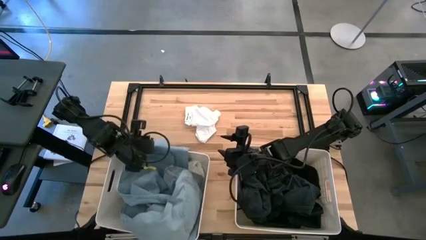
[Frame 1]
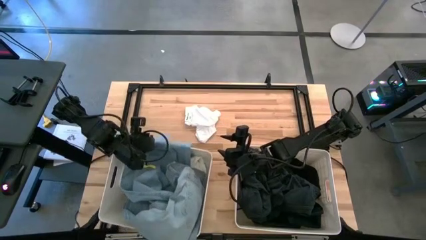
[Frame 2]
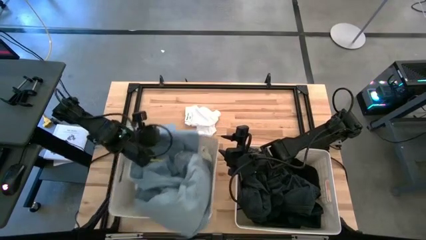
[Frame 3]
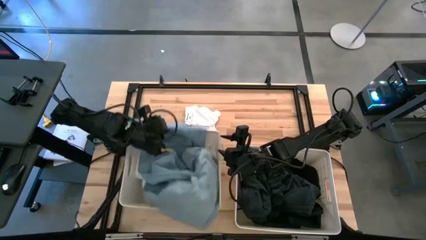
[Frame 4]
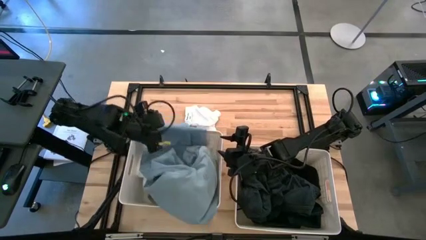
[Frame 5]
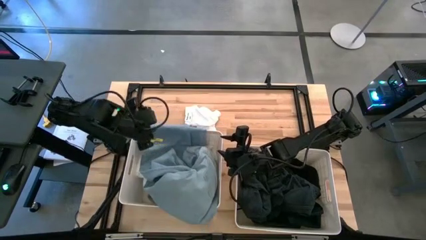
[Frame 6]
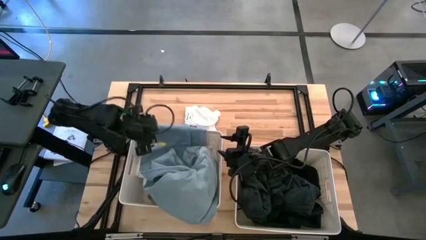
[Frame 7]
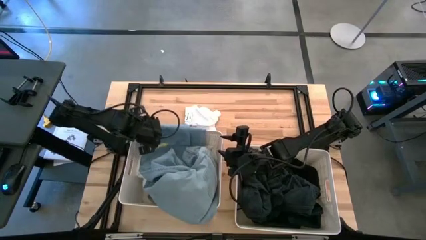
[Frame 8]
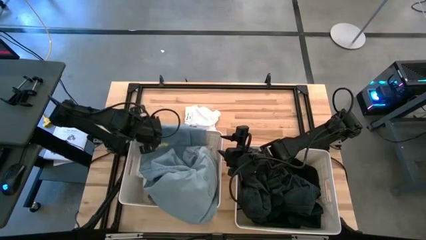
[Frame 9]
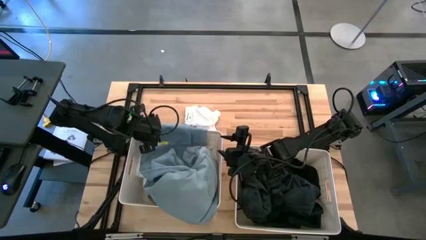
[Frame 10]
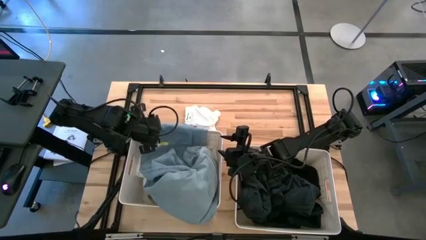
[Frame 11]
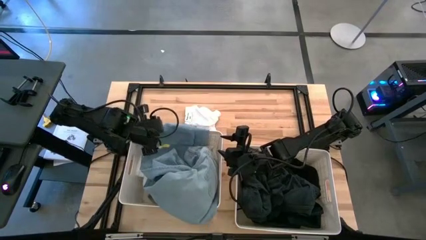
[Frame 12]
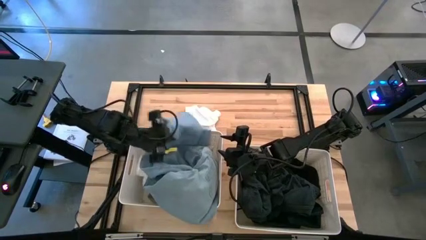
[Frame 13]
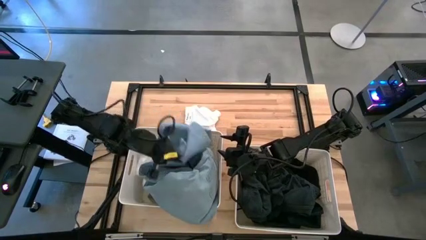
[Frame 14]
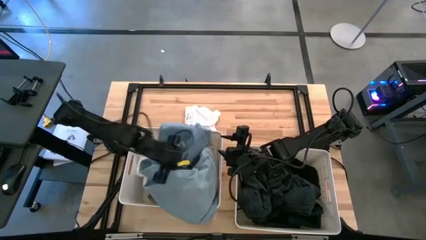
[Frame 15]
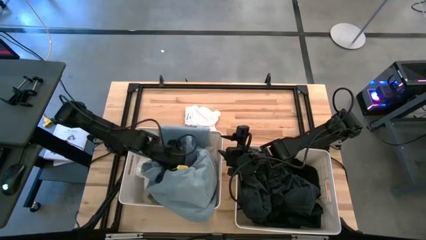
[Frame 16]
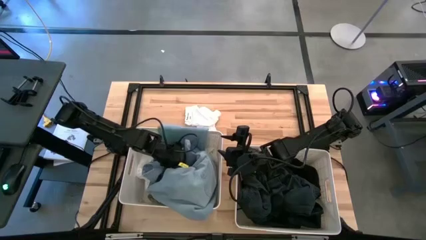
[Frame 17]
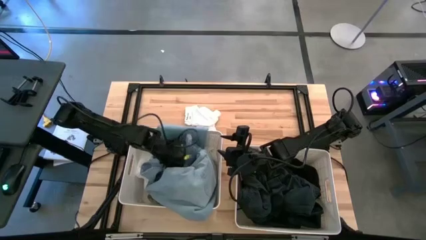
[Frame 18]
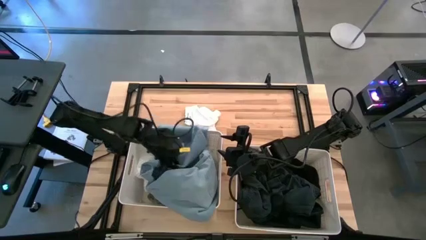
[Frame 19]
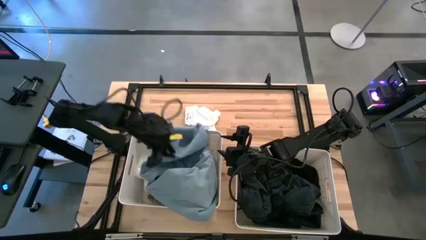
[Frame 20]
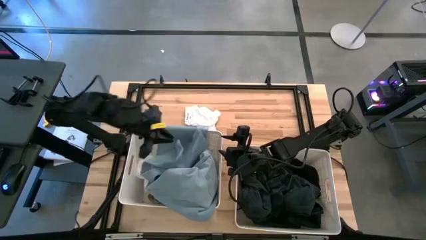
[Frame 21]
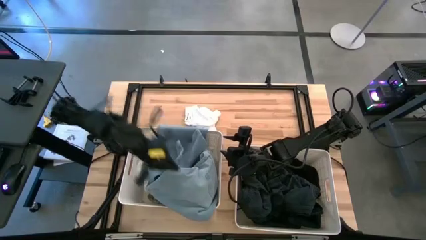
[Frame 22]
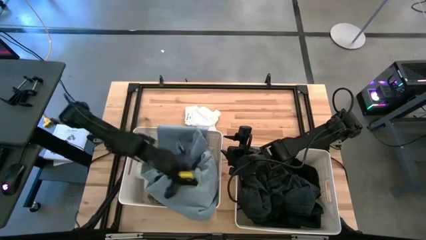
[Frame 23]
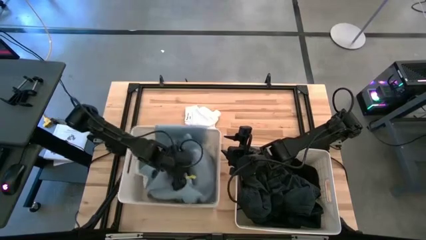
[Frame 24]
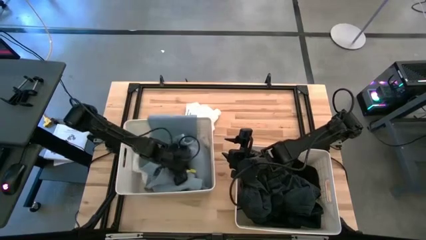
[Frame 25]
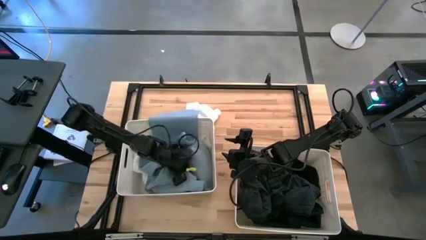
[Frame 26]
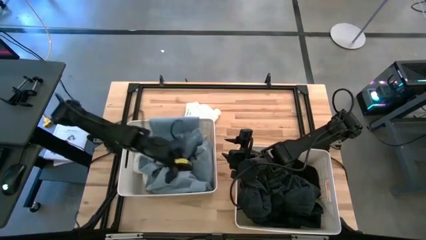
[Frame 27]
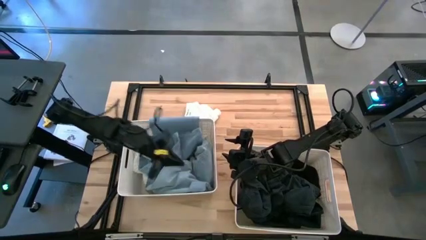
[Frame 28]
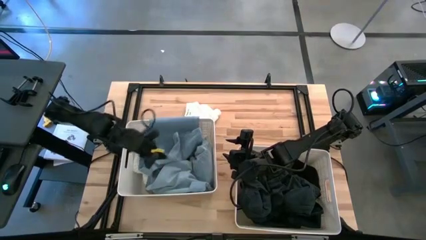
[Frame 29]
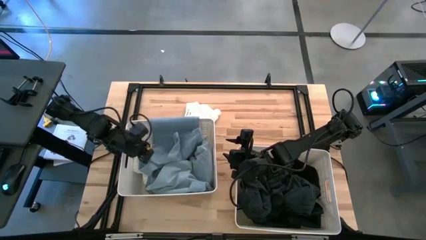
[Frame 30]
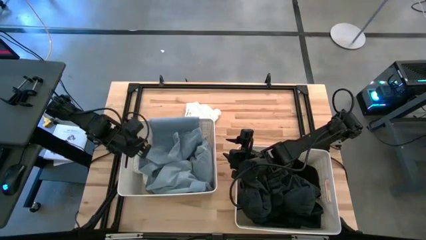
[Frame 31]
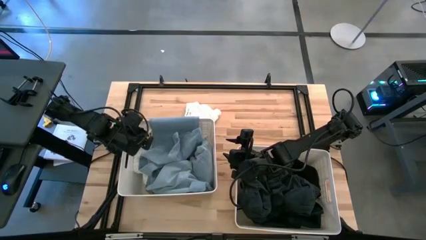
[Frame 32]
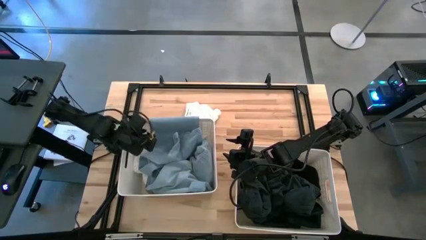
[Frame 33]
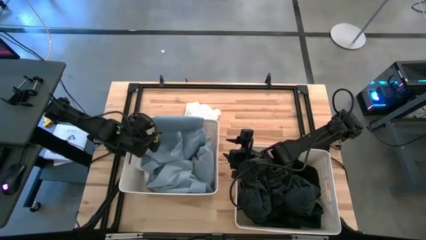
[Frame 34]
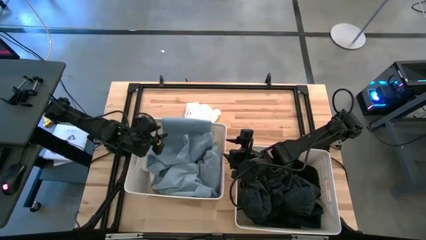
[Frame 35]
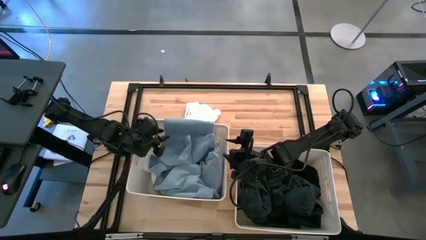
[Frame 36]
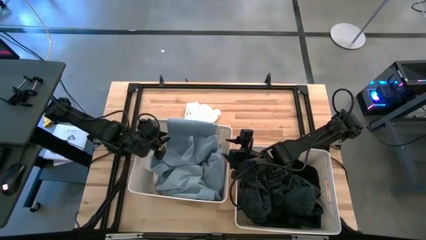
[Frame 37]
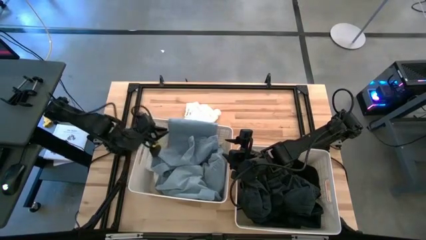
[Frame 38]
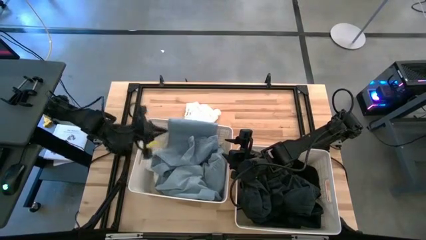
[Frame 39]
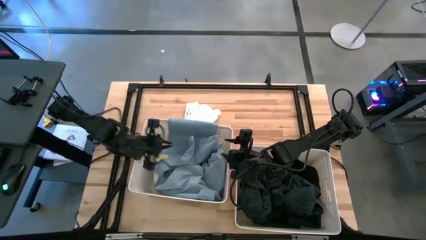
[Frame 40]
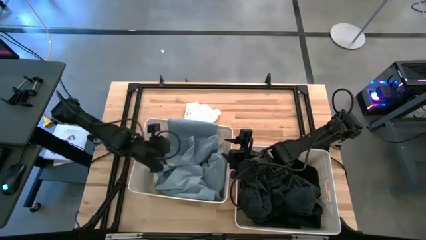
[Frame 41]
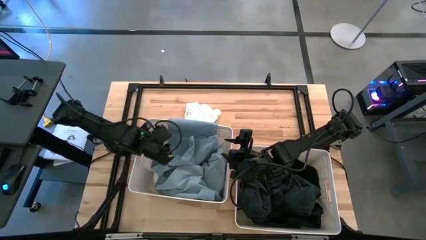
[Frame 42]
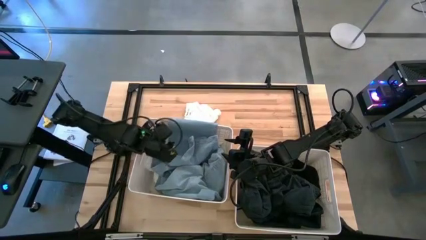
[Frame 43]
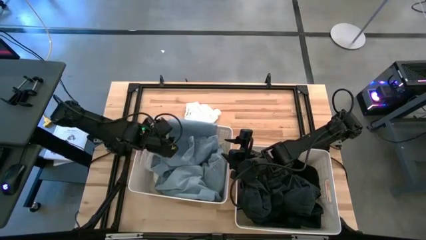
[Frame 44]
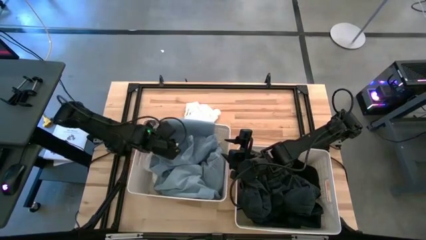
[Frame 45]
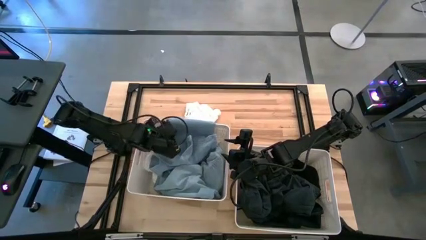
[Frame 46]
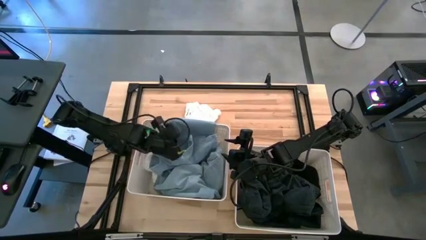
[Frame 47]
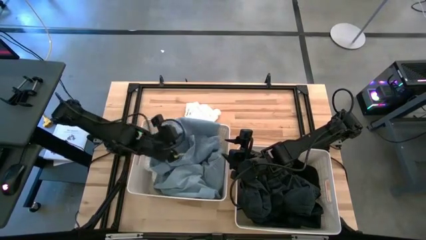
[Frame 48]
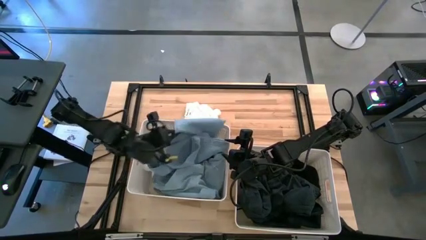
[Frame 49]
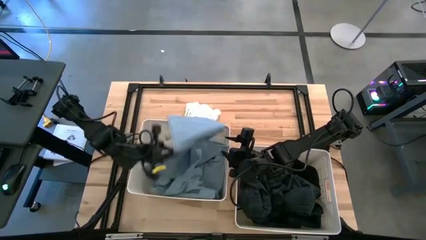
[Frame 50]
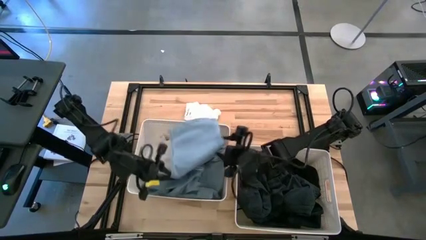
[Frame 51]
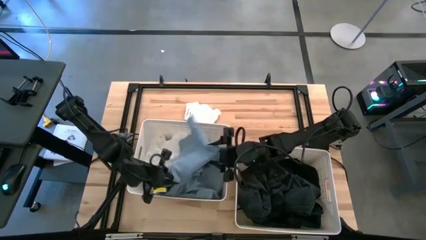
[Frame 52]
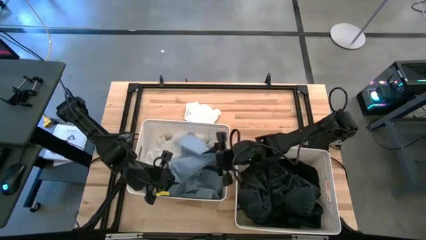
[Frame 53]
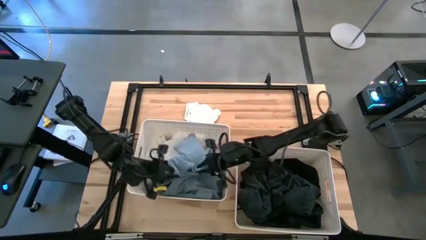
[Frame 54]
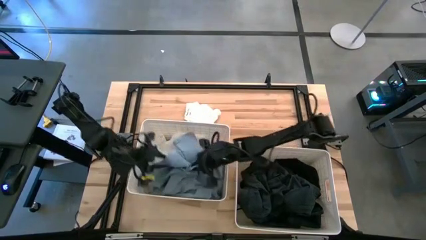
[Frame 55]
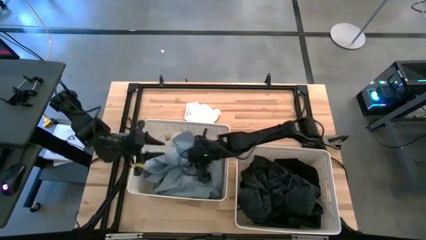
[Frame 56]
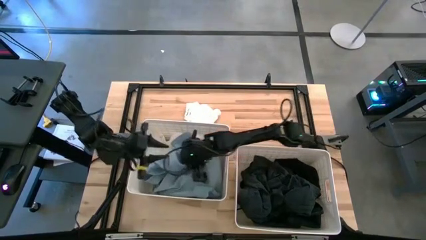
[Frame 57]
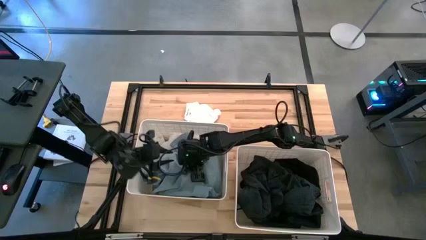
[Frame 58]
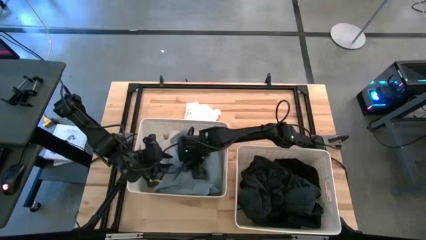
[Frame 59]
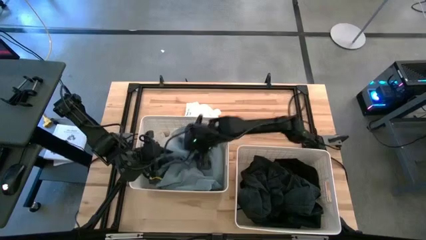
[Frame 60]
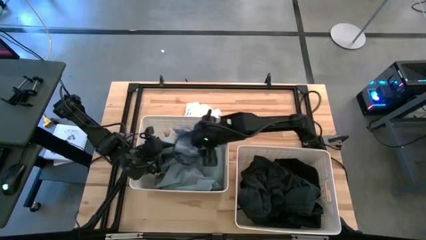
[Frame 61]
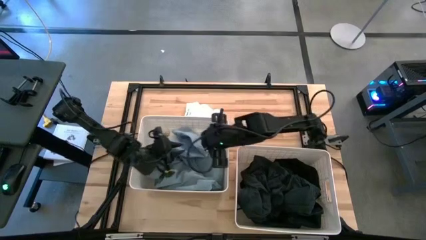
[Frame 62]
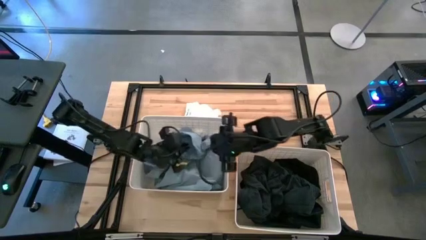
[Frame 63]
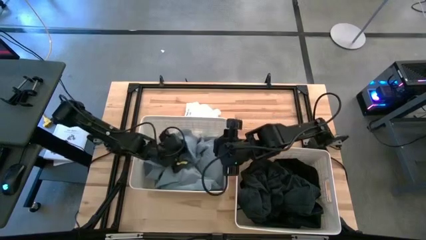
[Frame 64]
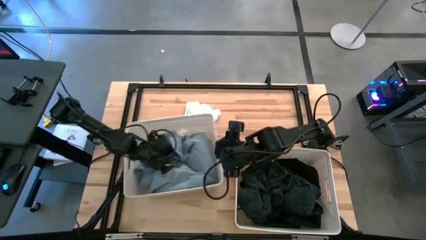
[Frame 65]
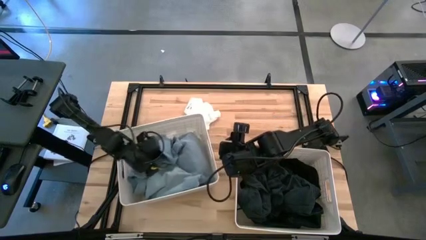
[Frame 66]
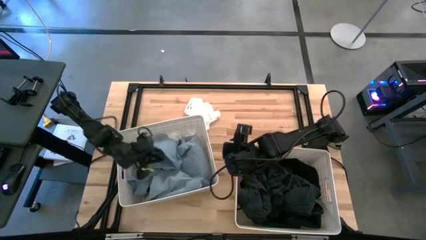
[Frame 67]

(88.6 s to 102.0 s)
Task: Sort clothes
Put the blue pants into the left white laundry bin

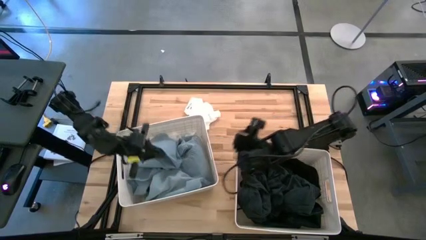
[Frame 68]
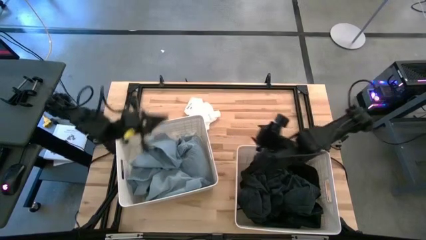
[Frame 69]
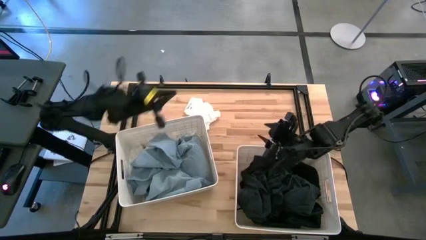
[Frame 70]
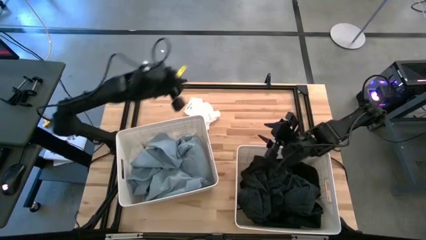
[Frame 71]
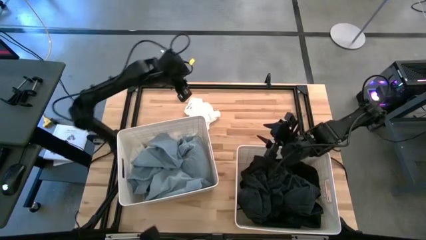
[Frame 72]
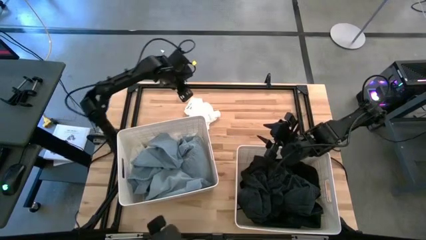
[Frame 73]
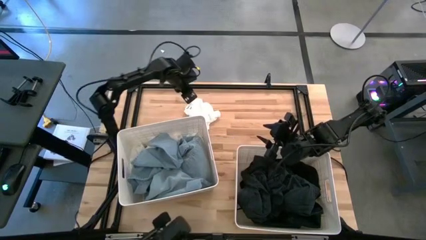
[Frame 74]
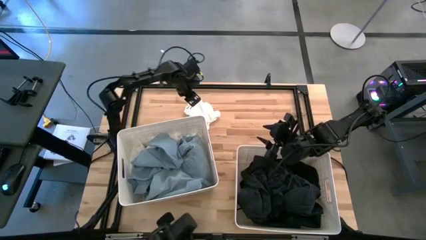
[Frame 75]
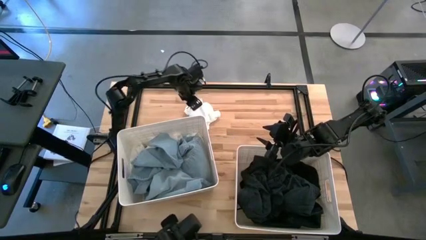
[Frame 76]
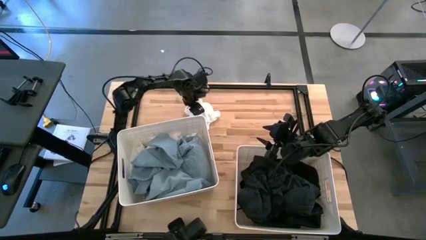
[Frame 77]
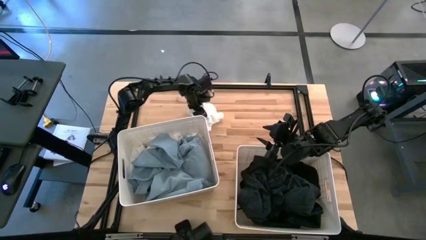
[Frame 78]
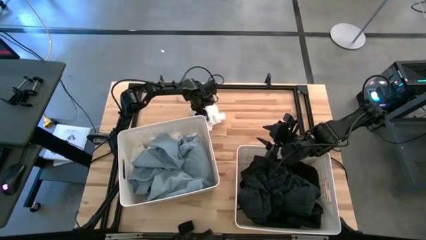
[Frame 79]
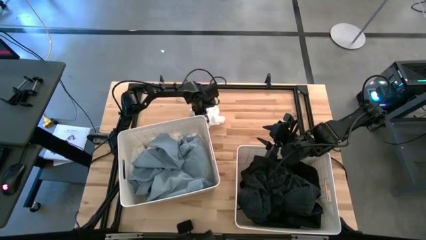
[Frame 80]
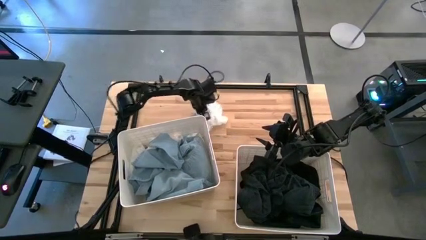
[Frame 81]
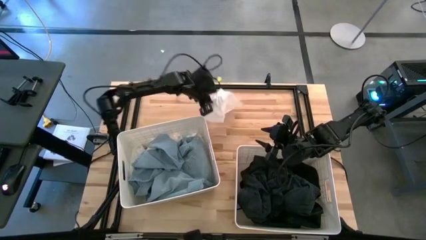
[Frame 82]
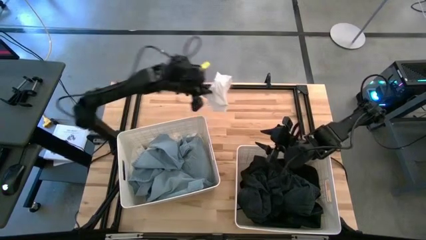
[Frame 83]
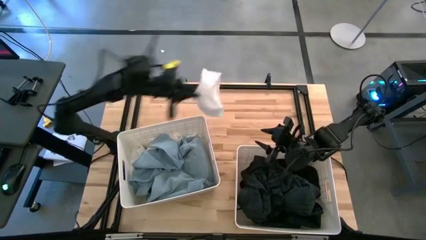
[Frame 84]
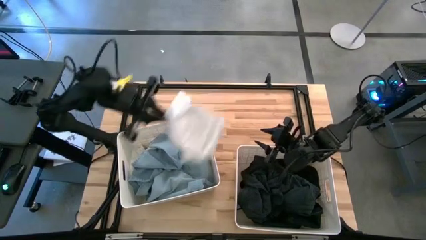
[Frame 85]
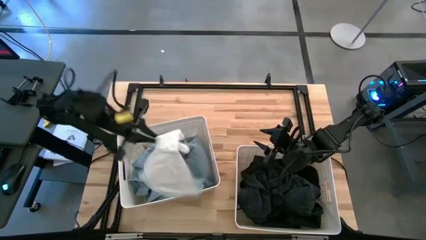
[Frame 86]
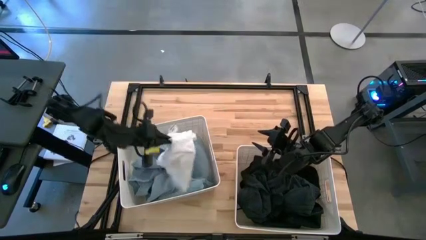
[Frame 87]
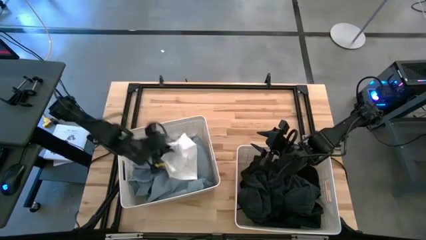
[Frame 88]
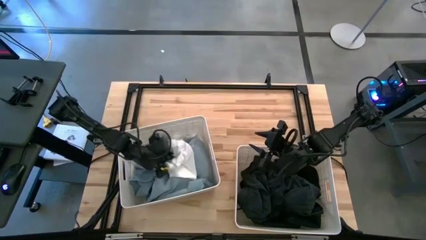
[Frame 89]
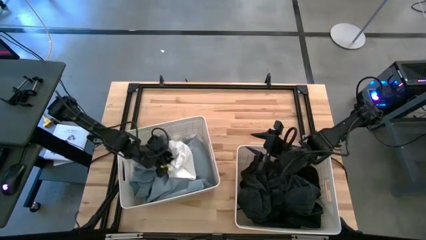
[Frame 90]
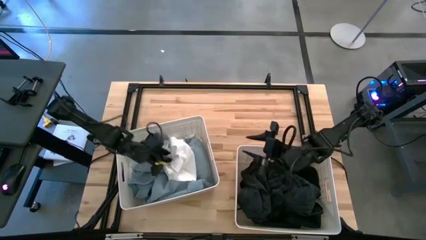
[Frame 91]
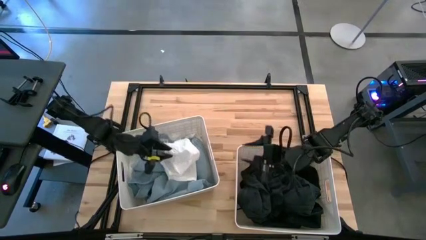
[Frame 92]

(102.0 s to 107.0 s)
Put the white shorts into the left white laundry bin
